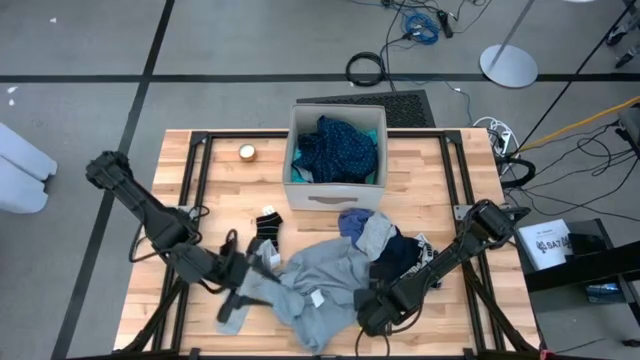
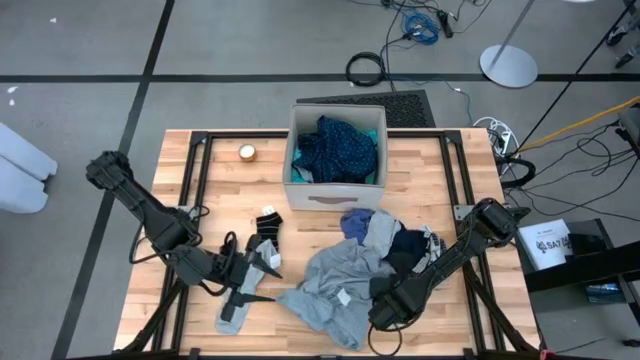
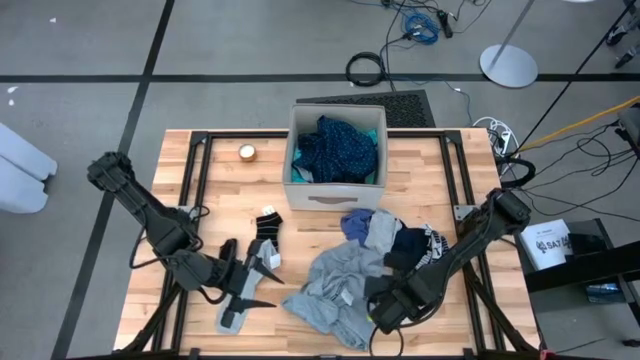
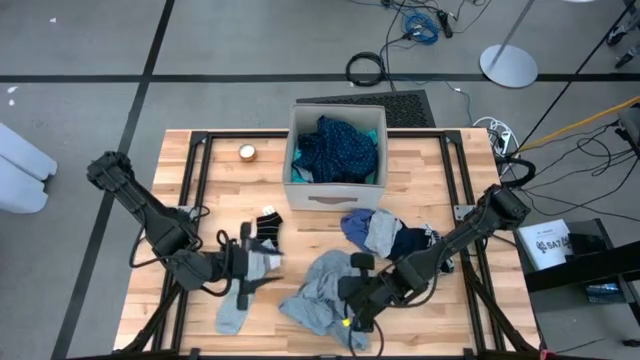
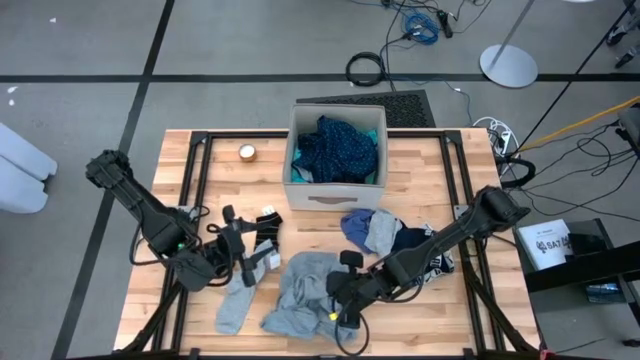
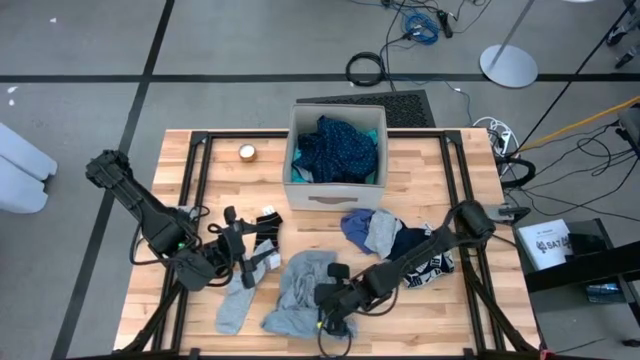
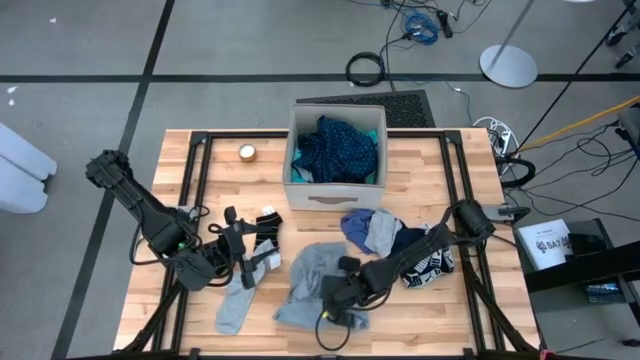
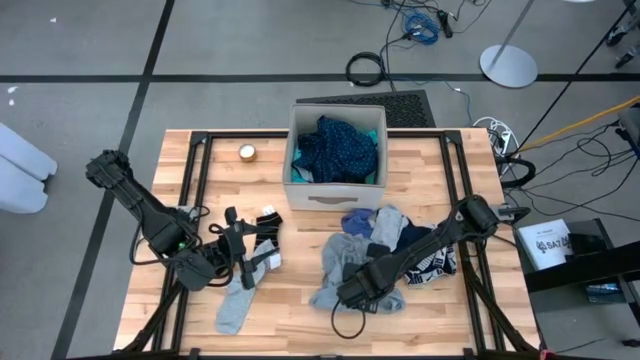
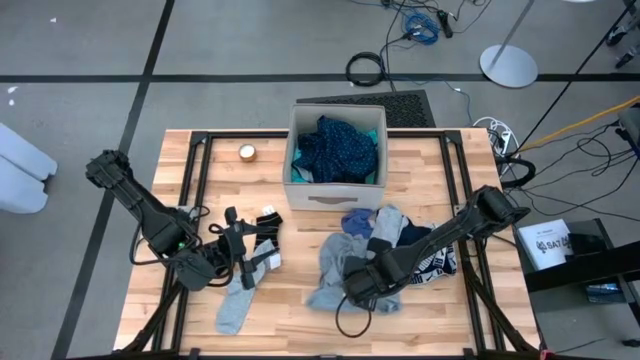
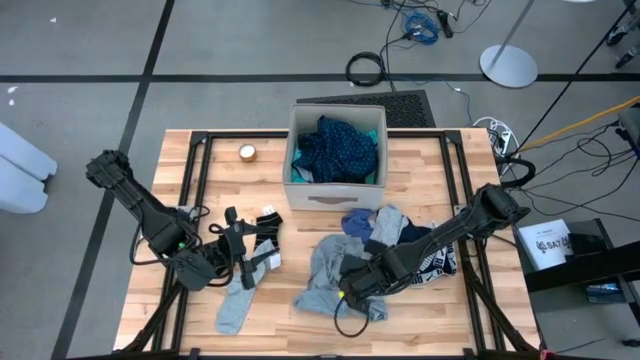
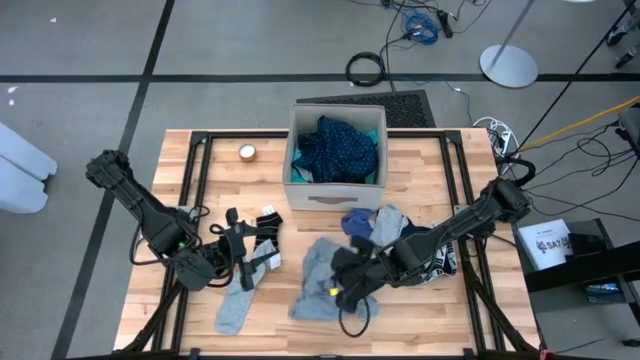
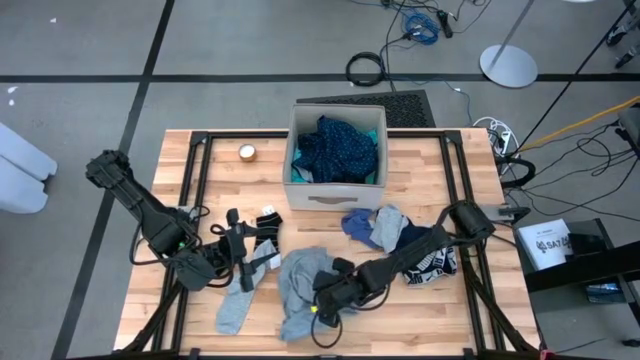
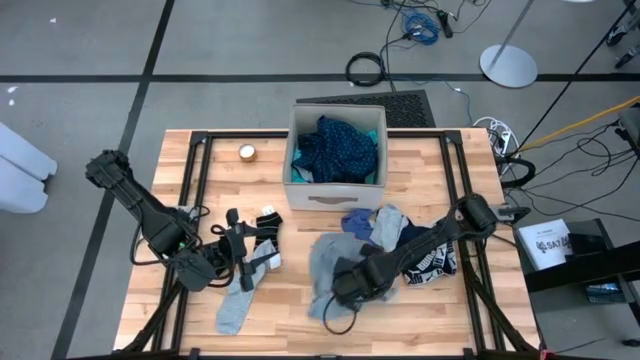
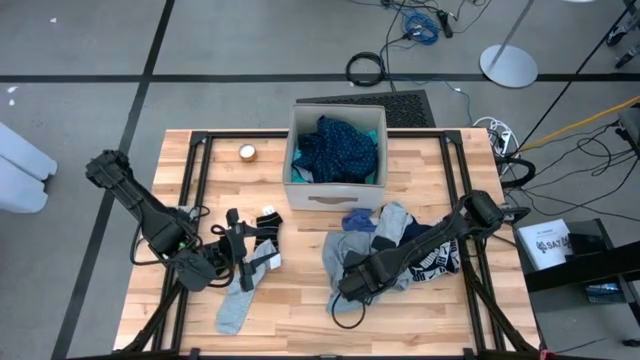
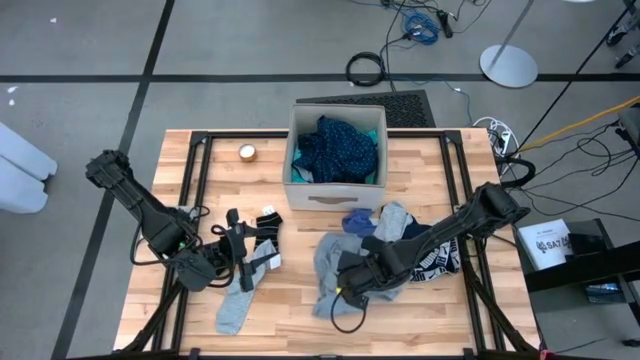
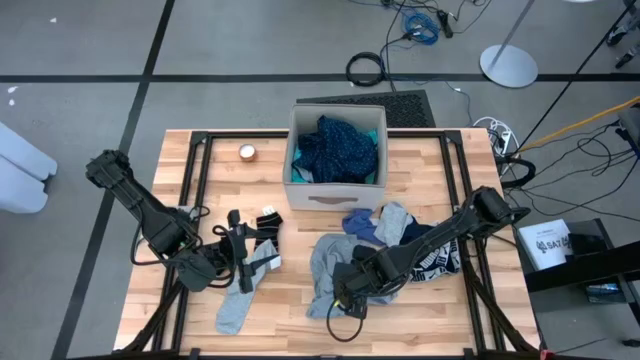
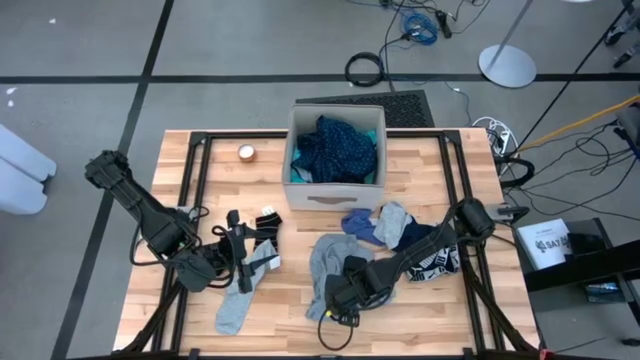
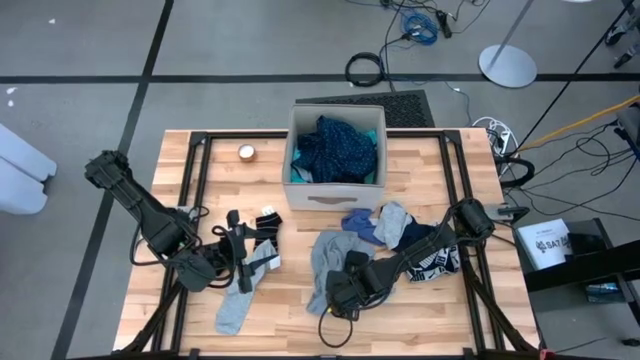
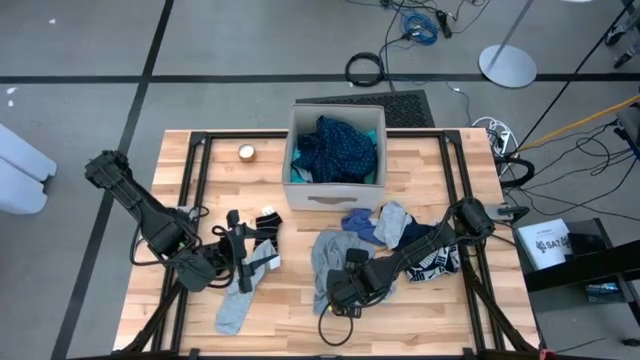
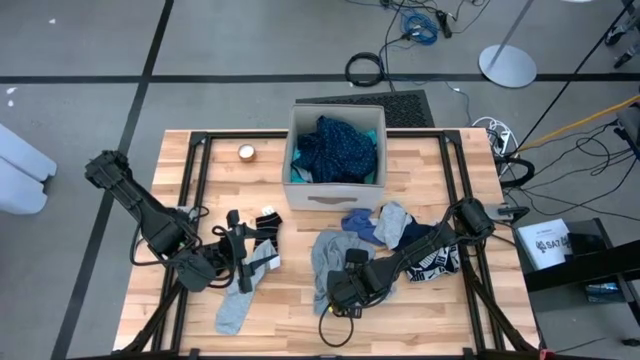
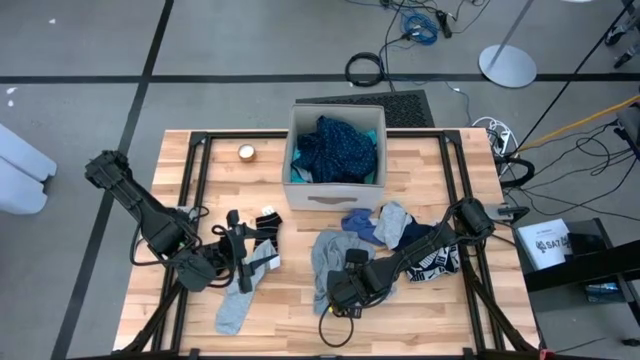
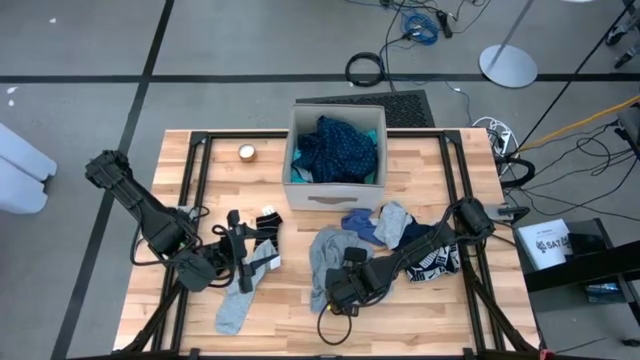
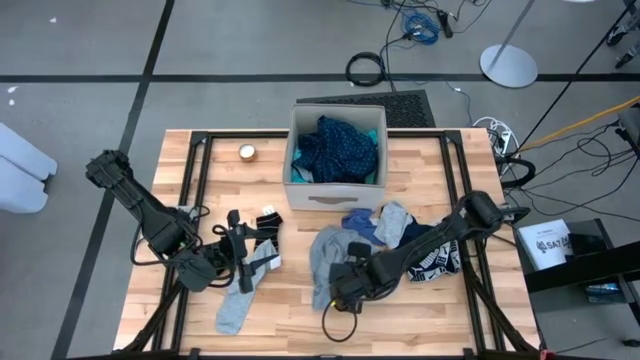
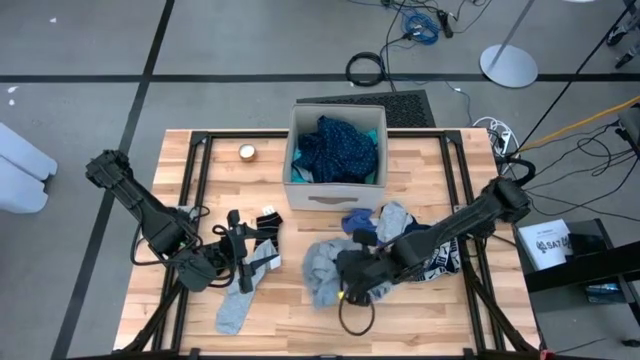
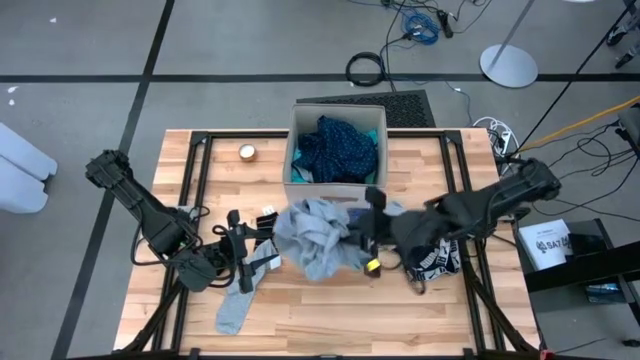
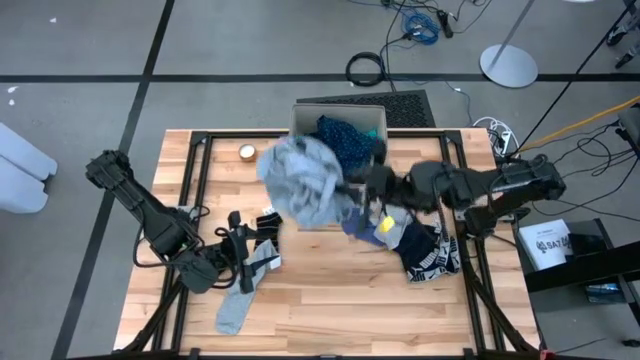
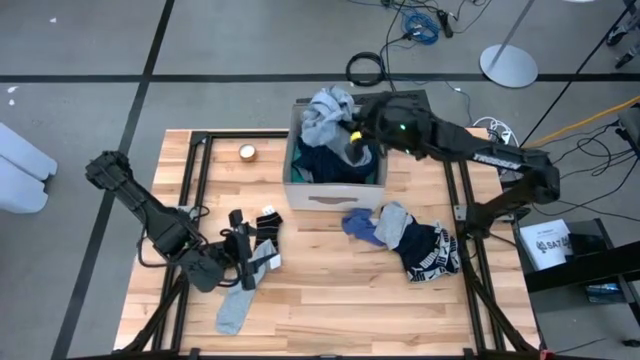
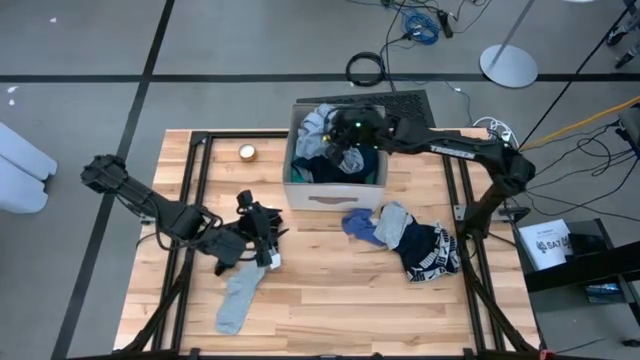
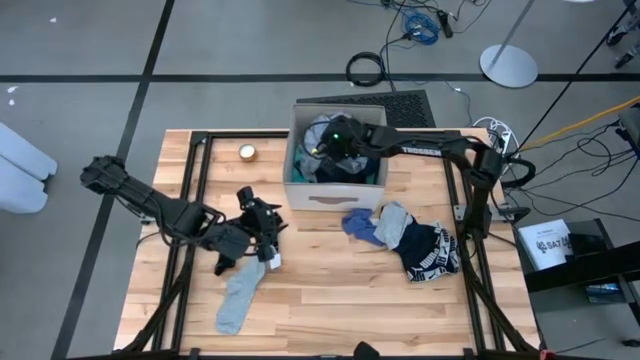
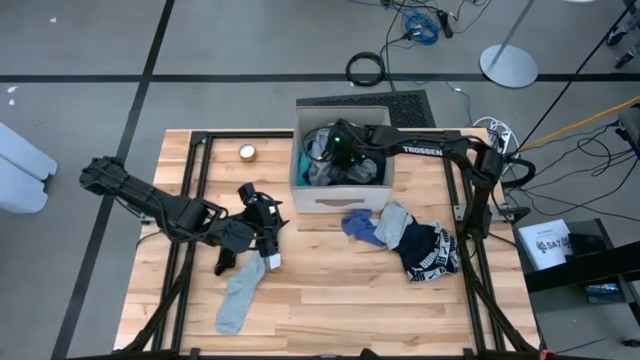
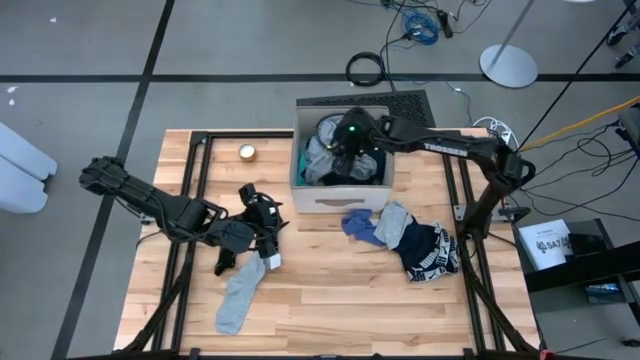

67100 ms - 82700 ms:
Task: Sort clothes
Put the gray shirt into the laundry organizer

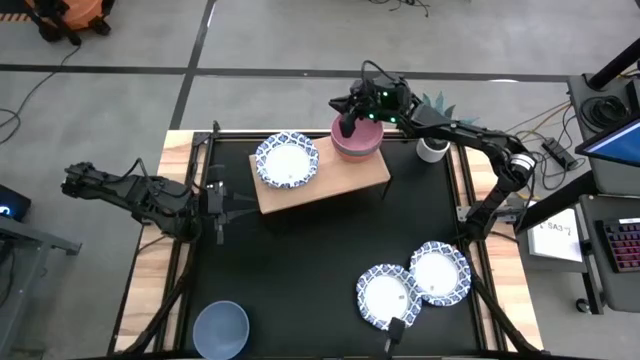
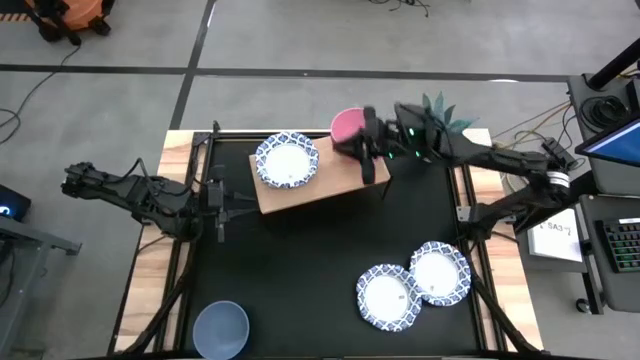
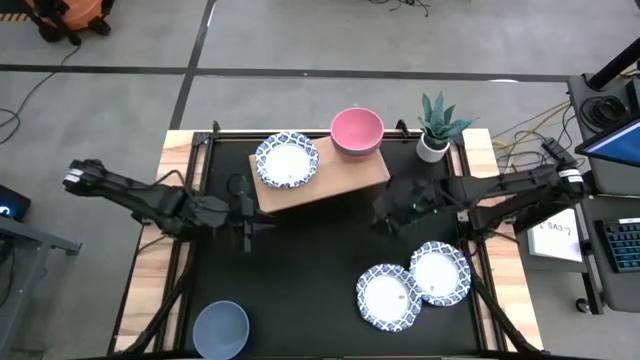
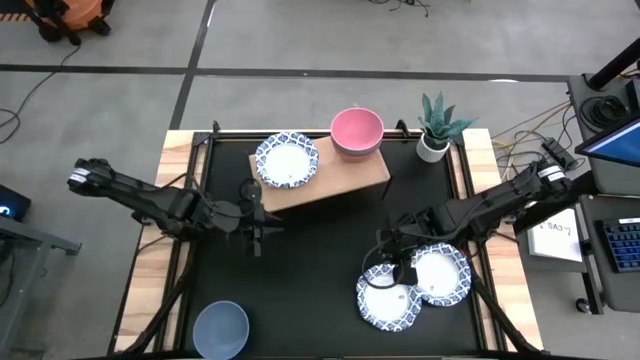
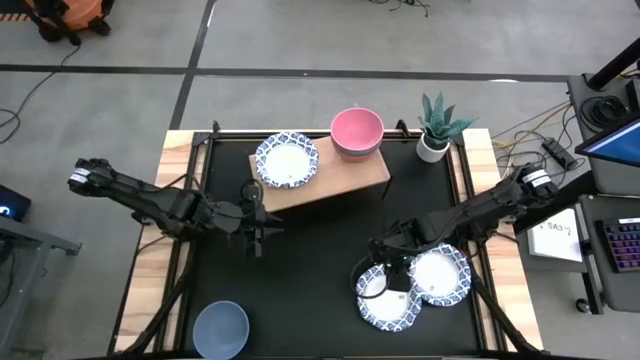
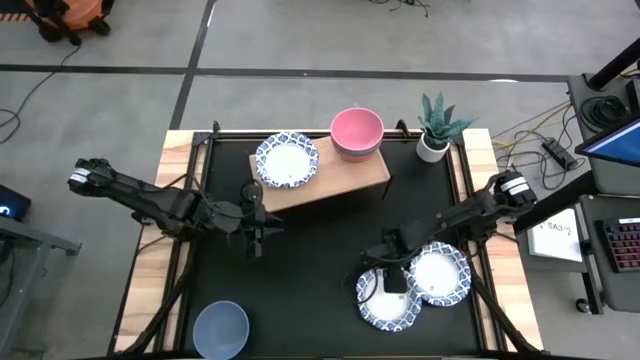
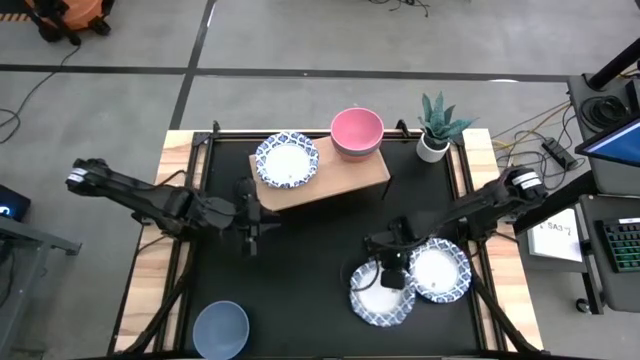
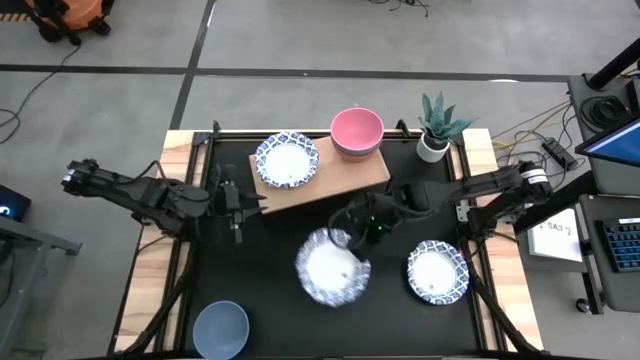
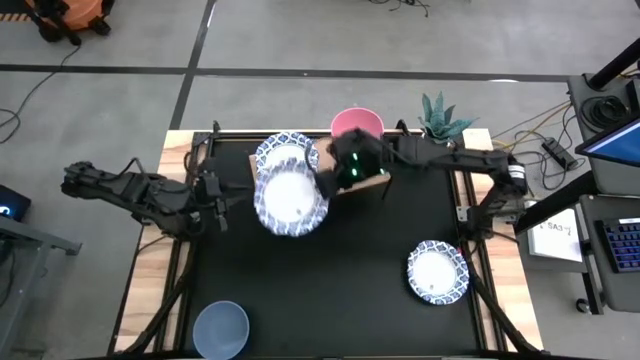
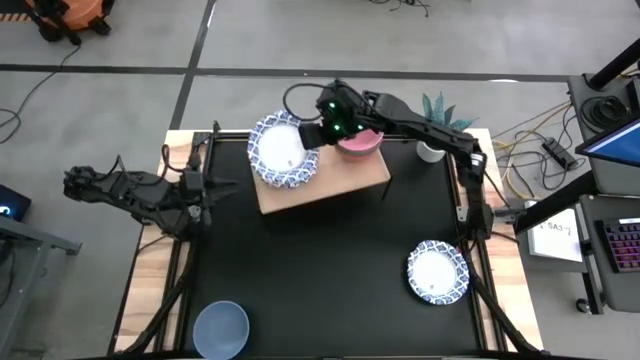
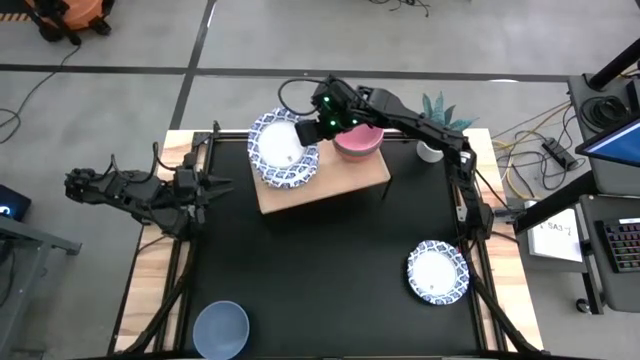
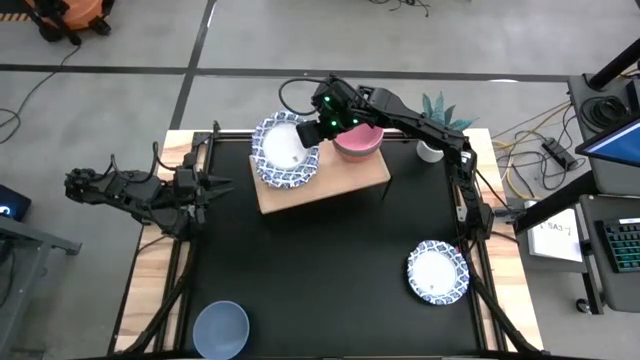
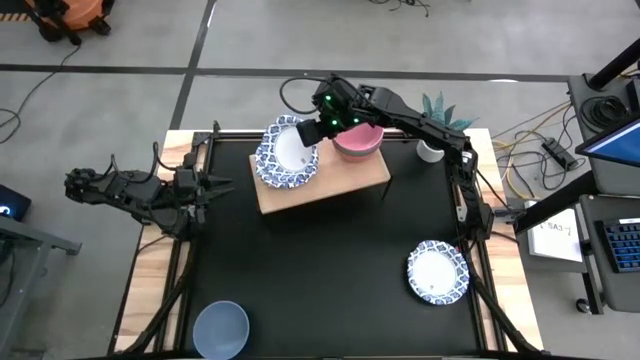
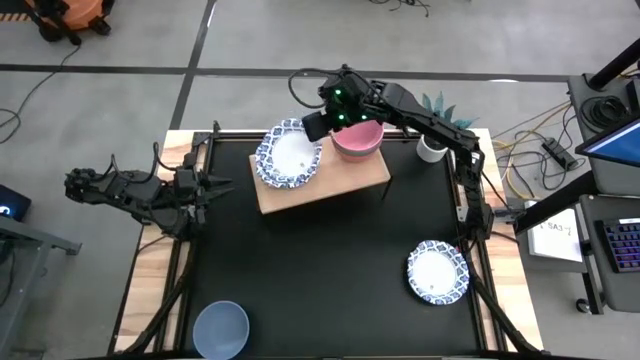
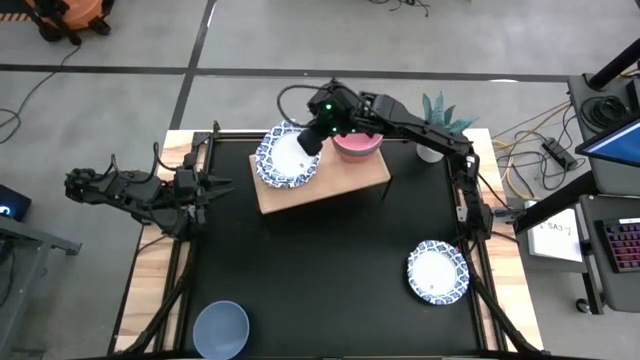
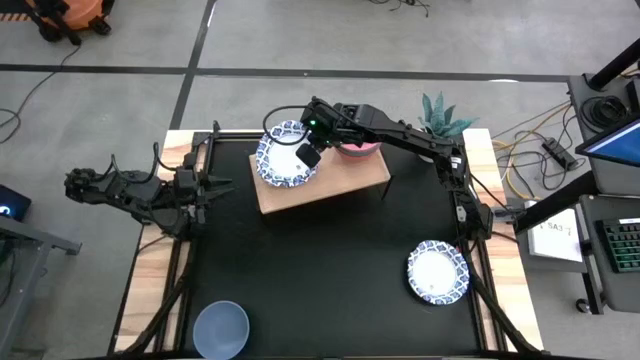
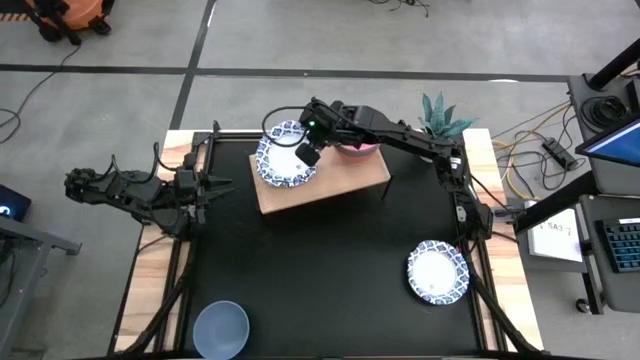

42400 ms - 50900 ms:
Task: Place and stack bowls onto a shelf
Stack the left white and blue bowl on top of the white and blue bowl
